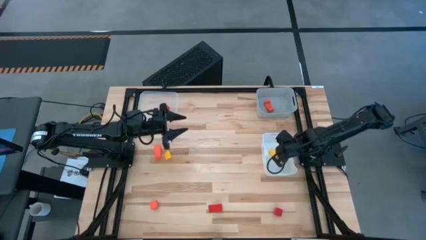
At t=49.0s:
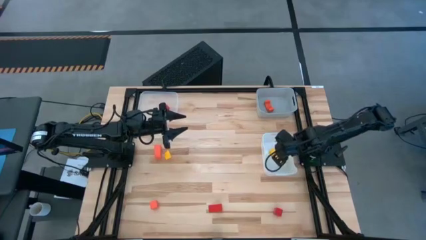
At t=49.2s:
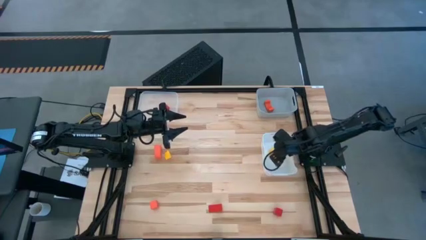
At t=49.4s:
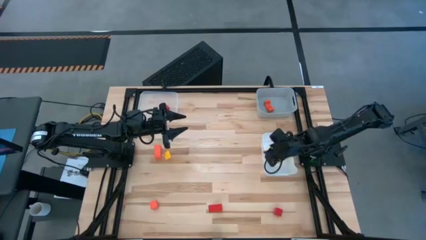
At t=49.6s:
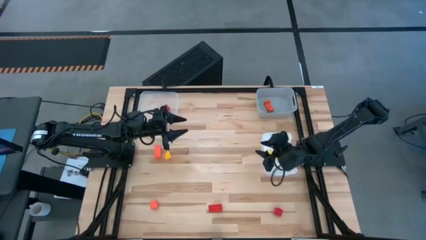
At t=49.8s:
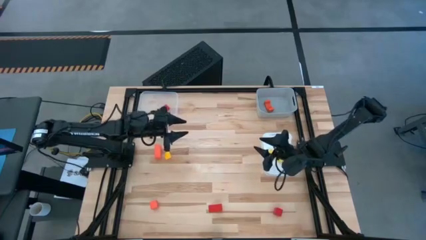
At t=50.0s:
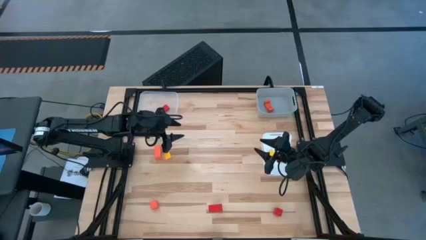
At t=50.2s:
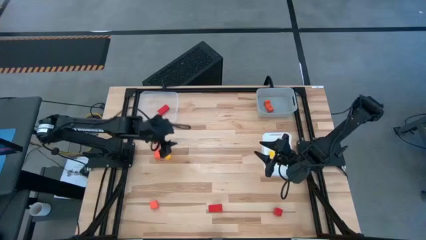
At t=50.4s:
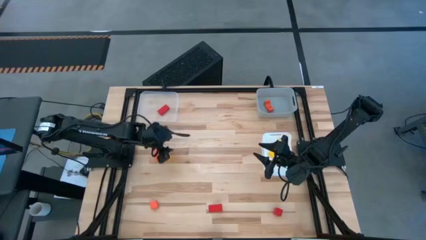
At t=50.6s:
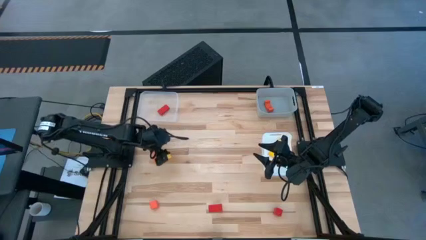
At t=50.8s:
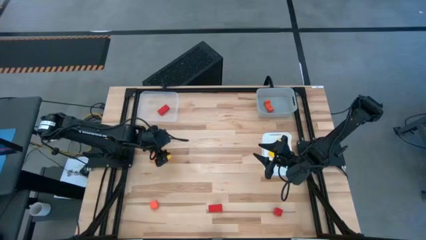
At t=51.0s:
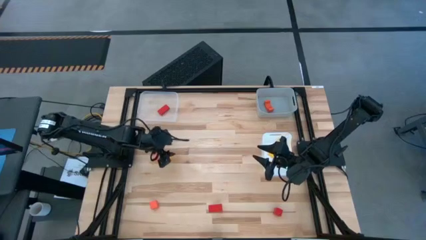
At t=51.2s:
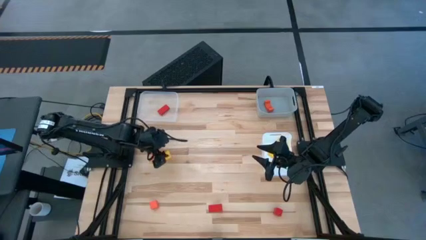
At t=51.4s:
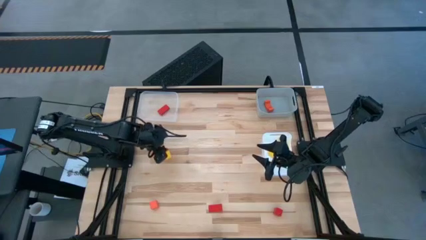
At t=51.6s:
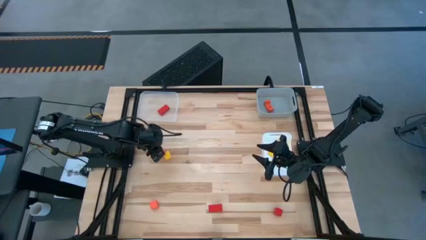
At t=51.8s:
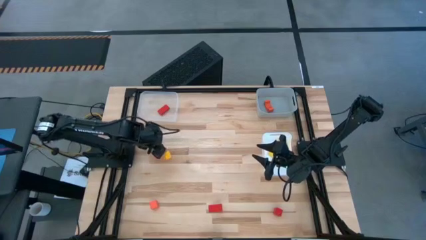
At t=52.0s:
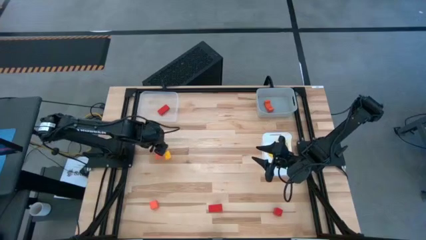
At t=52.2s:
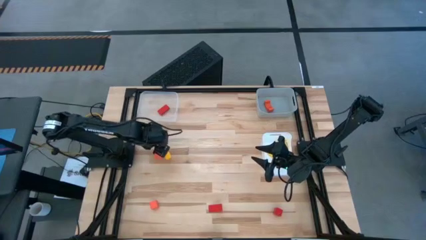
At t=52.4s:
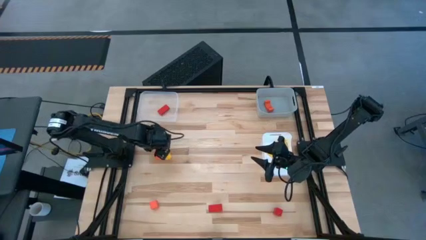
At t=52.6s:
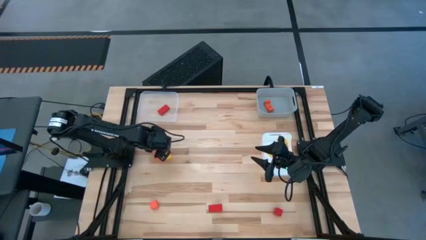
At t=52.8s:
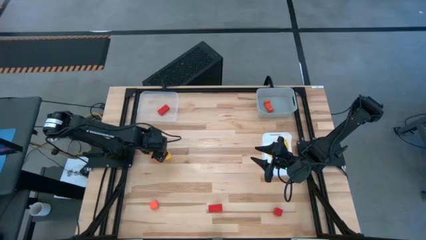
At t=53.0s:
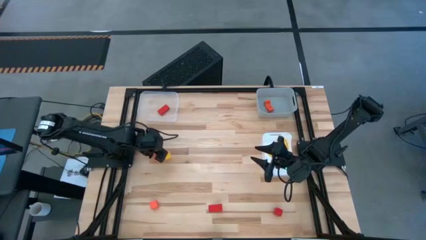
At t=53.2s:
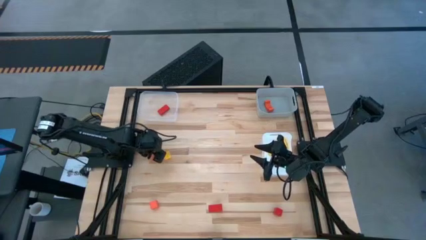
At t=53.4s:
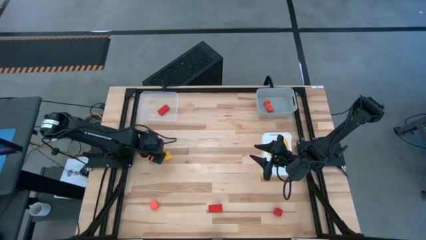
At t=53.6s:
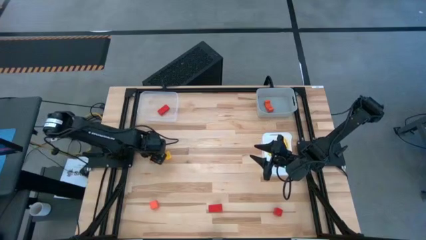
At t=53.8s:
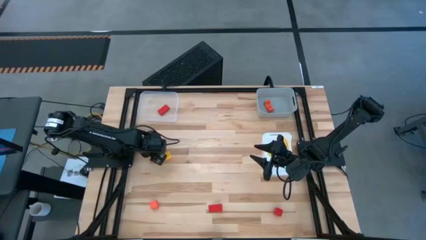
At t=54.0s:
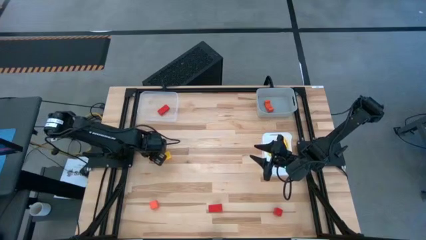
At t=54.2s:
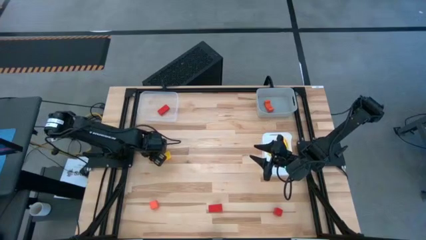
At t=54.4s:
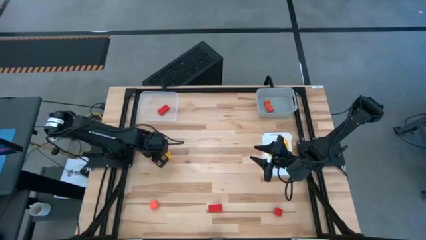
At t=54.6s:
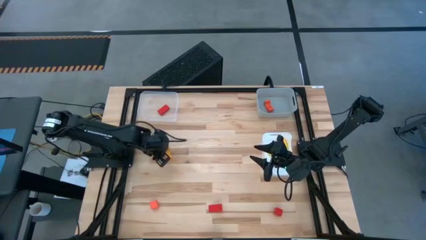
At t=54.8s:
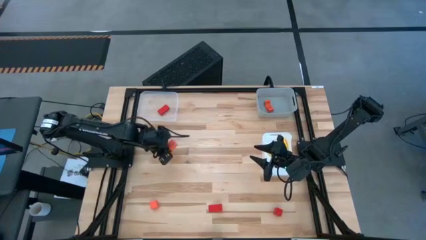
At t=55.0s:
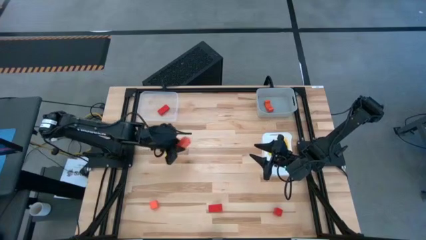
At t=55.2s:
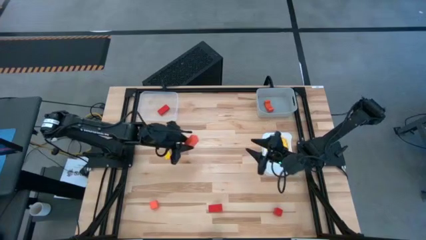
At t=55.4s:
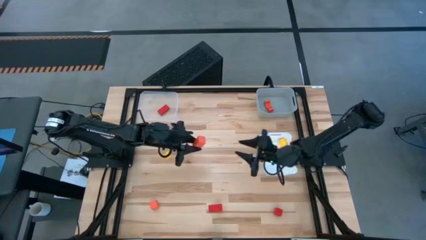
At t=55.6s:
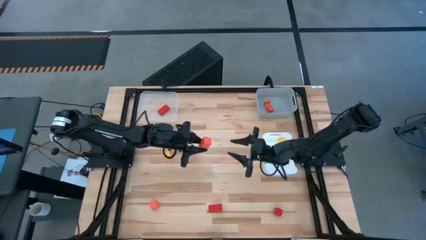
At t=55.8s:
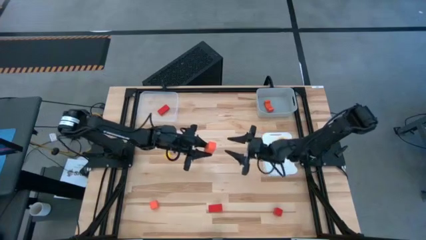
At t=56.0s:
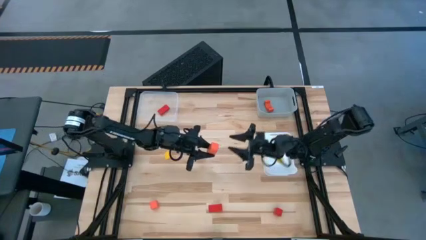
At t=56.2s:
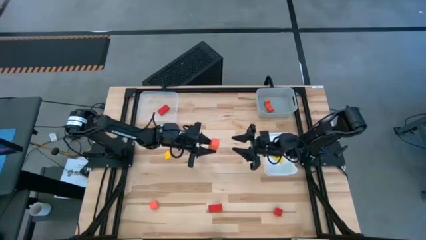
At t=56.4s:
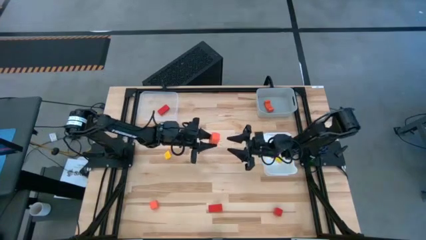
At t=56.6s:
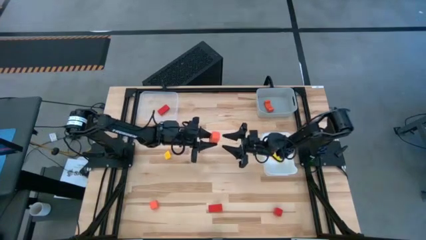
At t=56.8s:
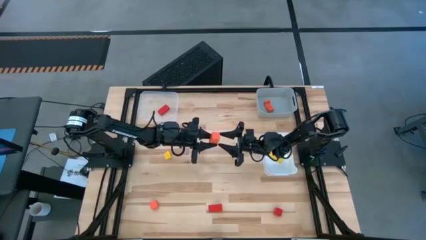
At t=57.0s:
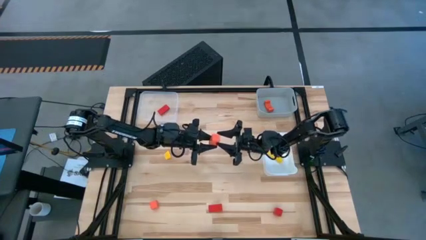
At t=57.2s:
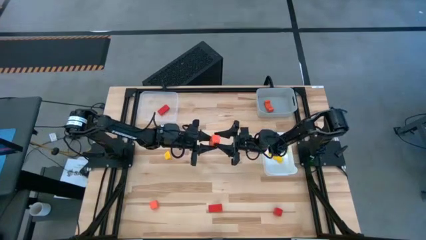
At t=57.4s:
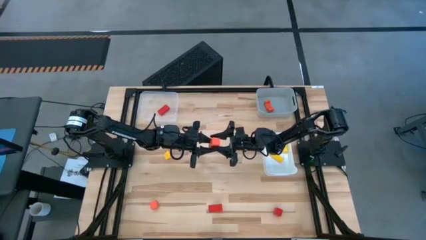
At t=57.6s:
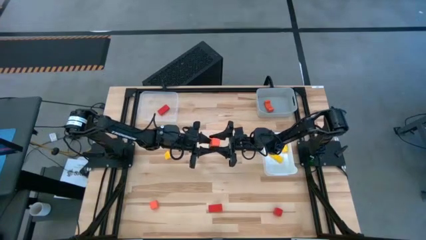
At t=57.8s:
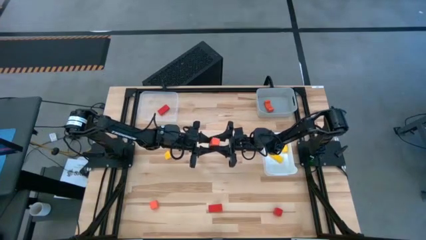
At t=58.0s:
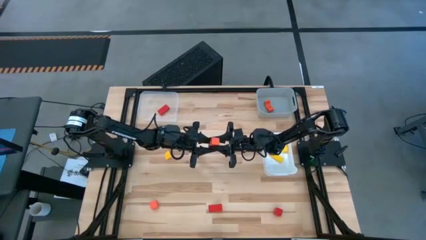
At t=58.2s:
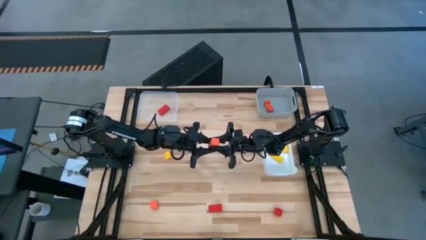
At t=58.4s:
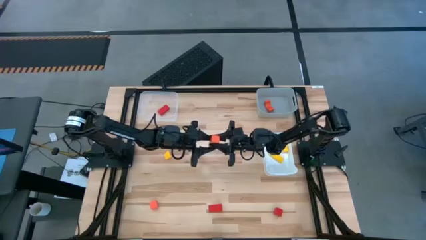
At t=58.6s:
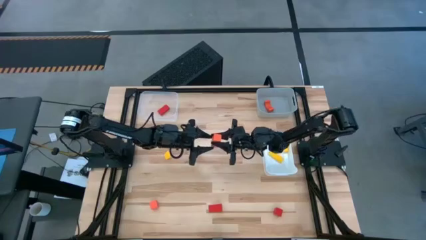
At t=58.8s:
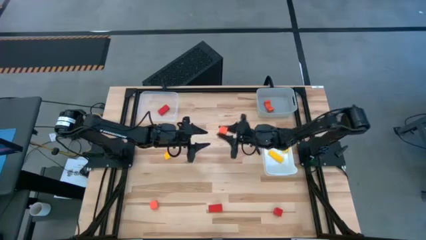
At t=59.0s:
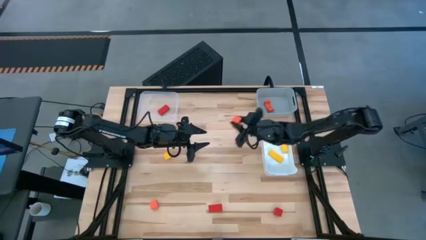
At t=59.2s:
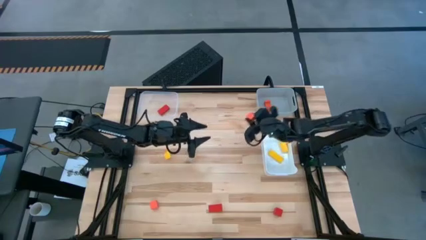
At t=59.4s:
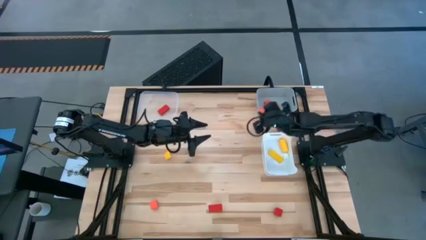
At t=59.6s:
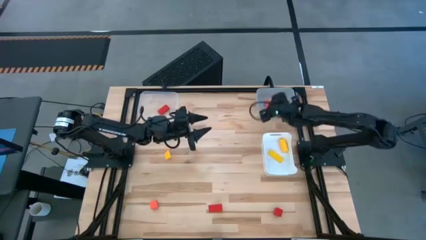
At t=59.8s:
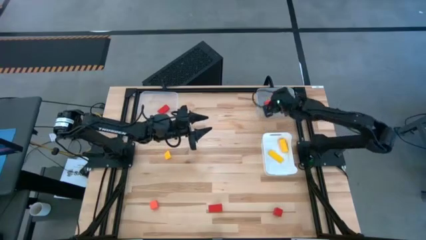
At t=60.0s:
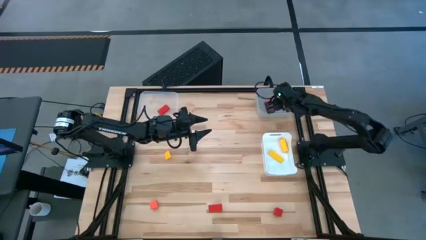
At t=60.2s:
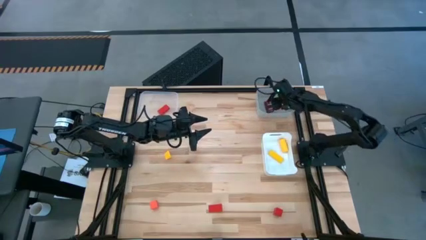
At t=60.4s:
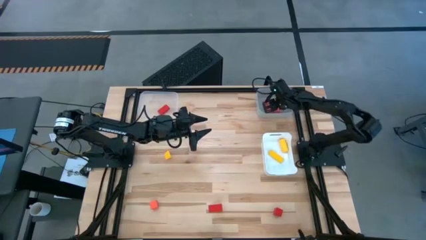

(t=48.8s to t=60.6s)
Task: Sort & place blocks by color
Put the top orange block into the gray bin

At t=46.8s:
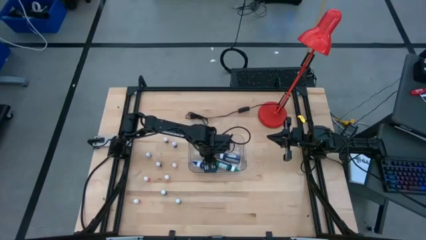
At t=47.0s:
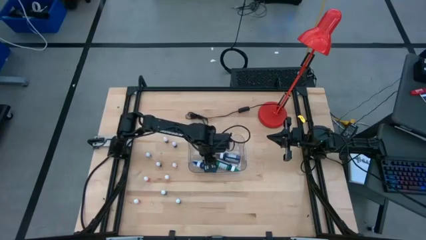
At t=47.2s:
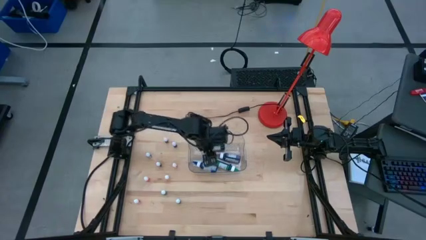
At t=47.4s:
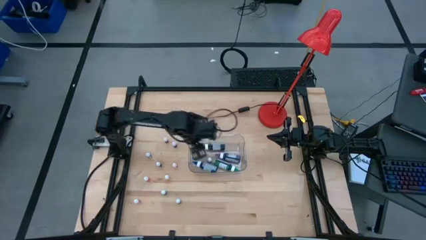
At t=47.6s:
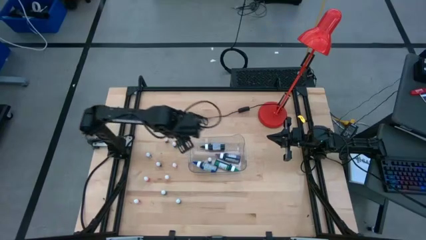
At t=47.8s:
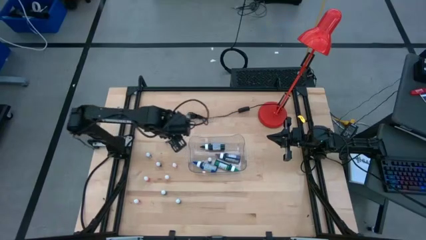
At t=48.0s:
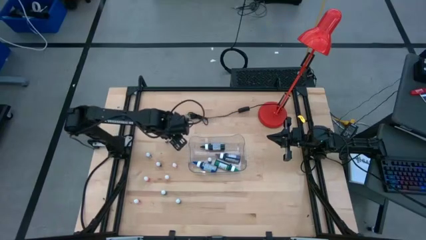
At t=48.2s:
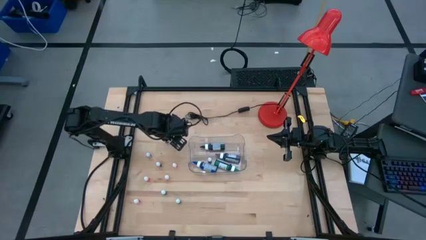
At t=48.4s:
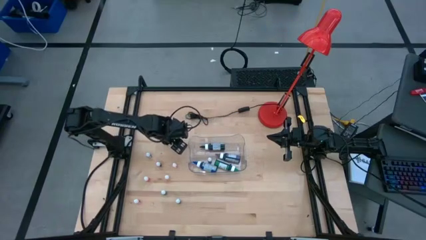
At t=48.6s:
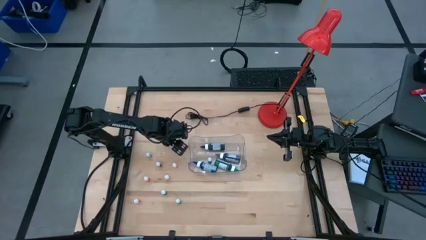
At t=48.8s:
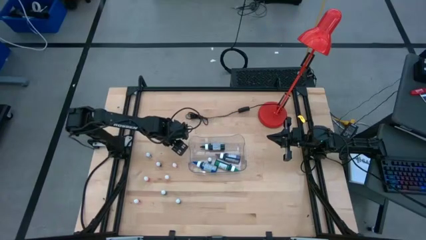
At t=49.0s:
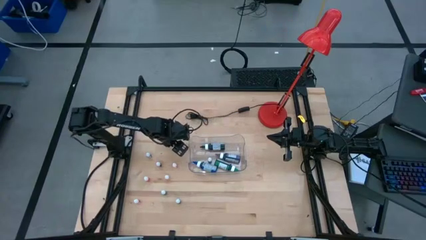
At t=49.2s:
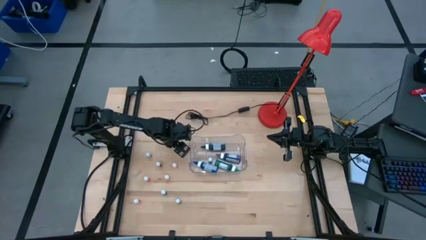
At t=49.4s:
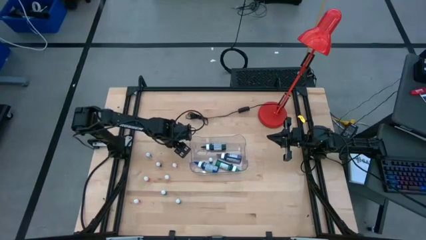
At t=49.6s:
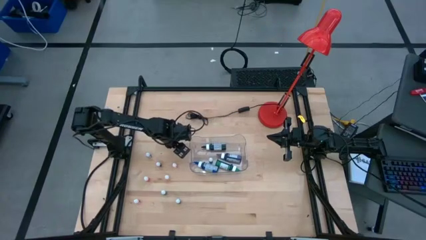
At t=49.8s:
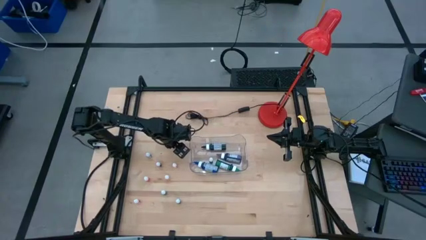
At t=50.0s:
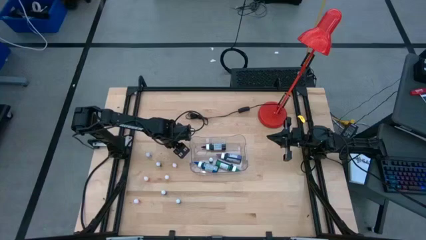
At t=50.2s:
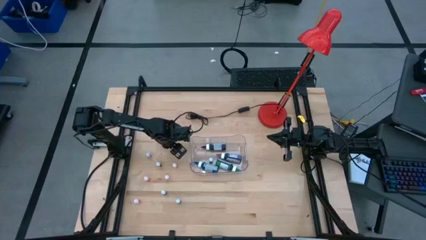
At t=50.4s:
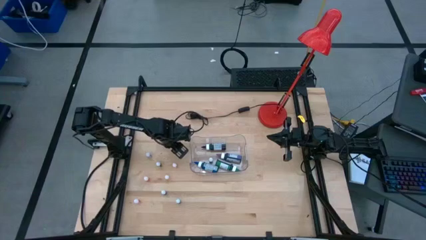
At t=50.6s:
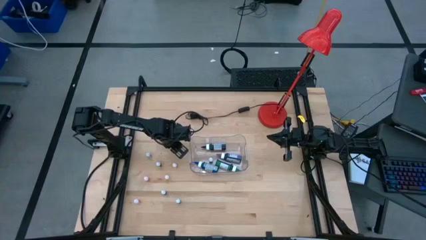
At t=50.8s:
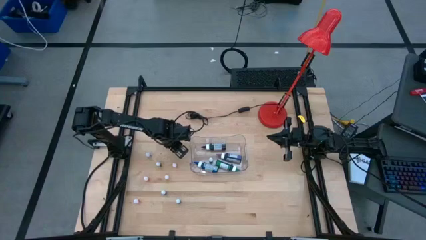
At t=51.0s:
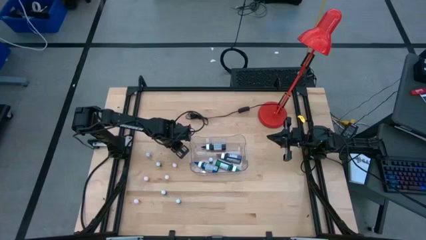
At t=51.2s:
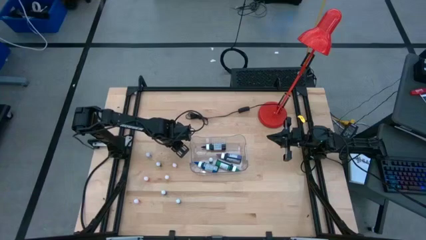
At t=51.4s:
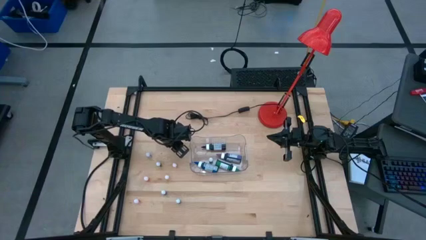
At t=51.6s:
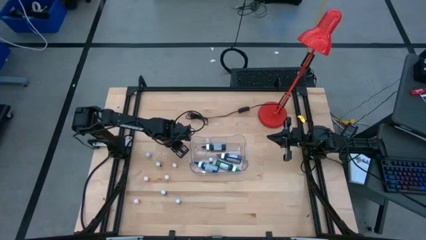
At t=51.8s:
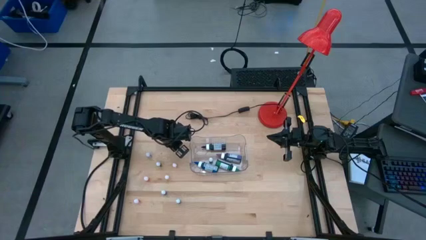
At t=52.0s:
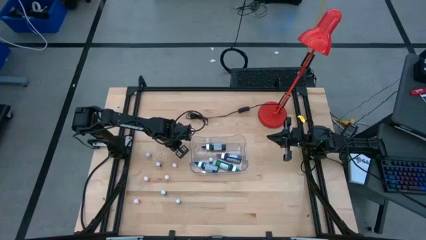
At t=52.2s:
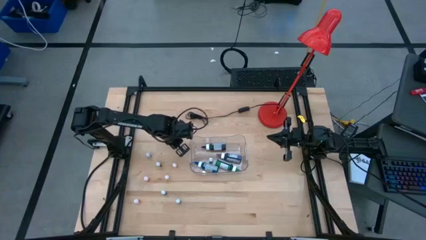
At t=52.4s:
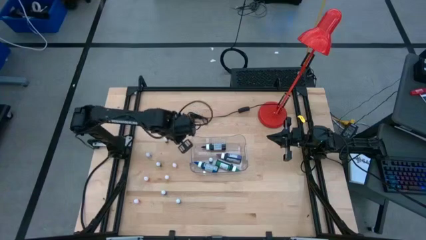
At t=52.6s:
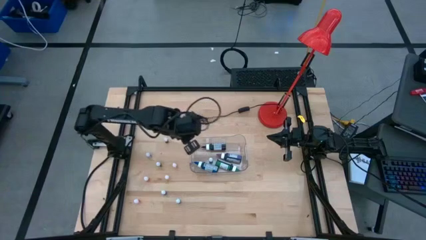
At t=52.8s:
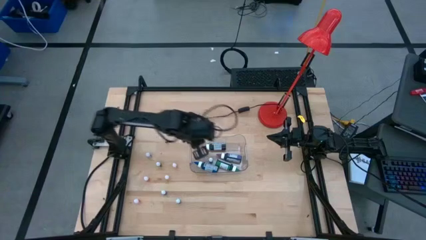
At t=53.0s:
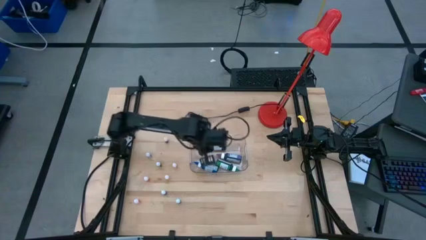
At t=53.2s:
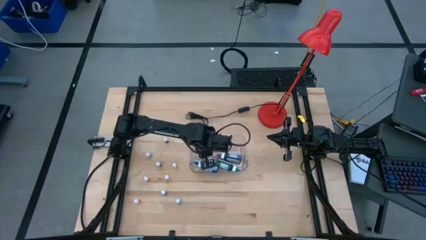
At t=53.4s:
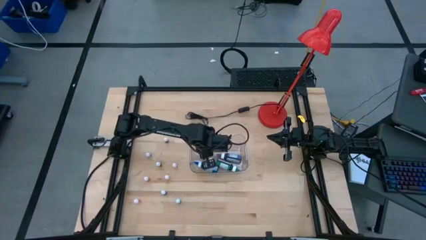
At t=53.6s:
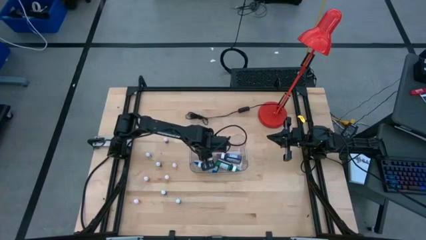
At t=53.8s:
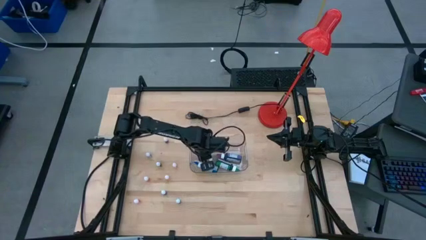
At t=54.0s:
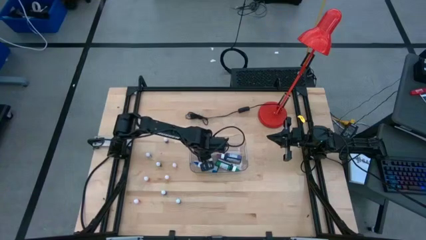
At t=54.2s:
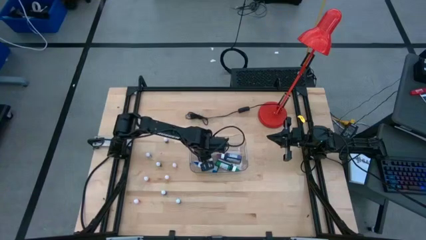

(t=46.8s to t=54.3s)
Task: Pick & Place food coloring
Put the small violet food coloring bottle into the transparent bin
